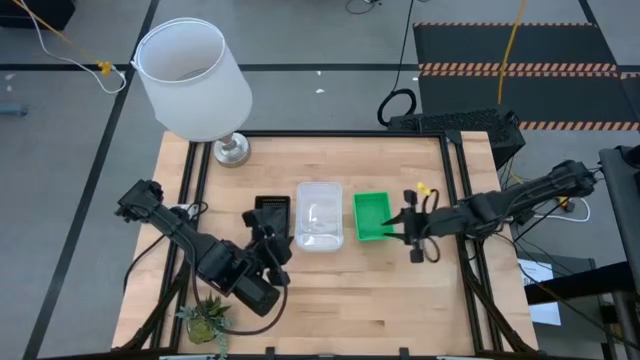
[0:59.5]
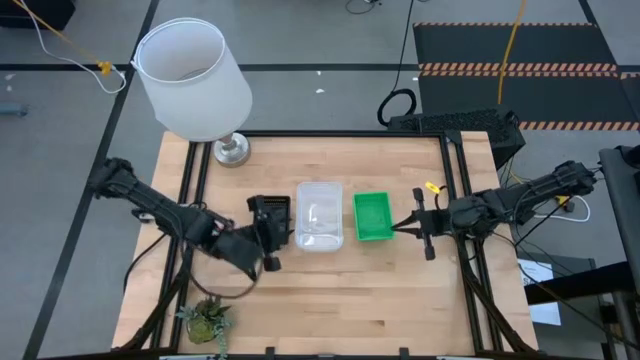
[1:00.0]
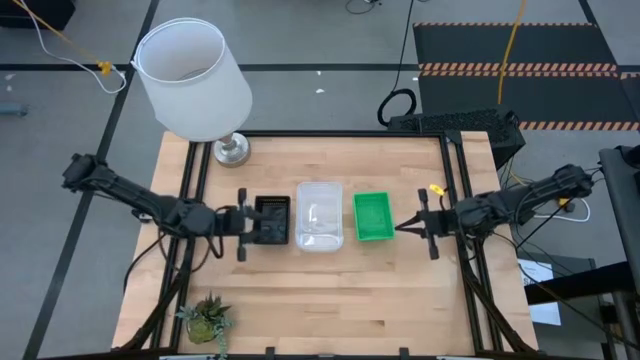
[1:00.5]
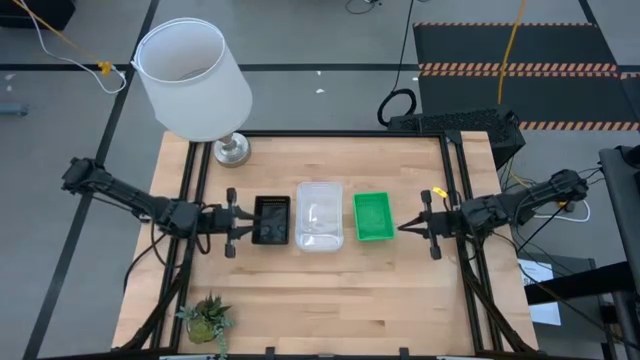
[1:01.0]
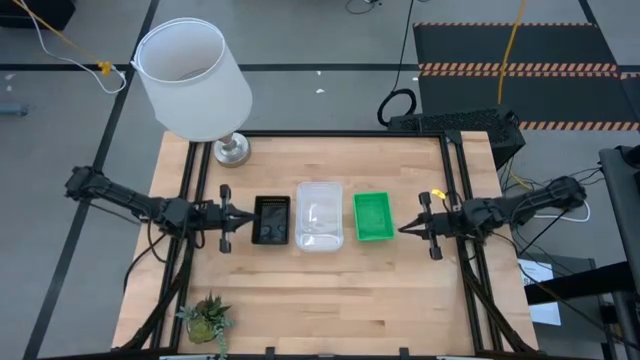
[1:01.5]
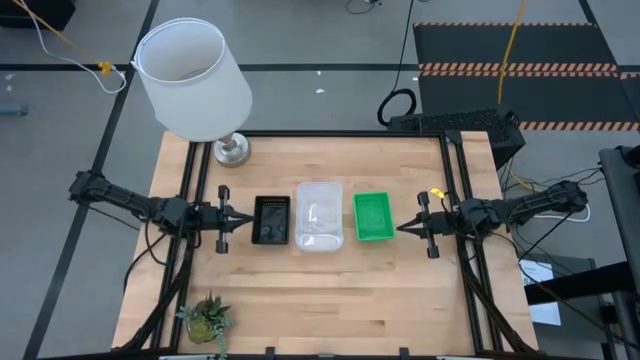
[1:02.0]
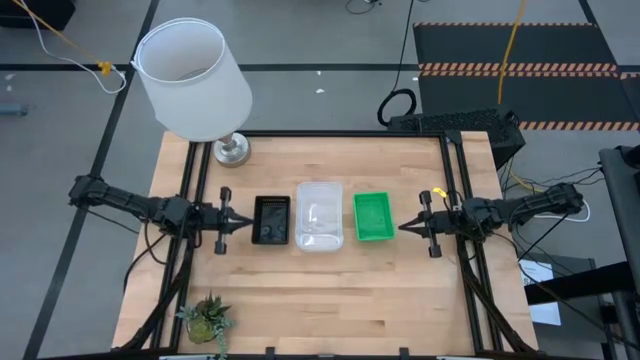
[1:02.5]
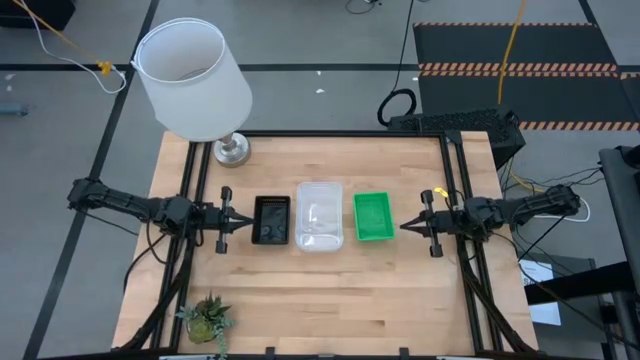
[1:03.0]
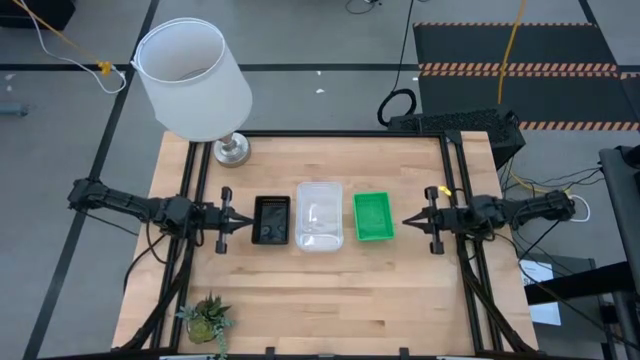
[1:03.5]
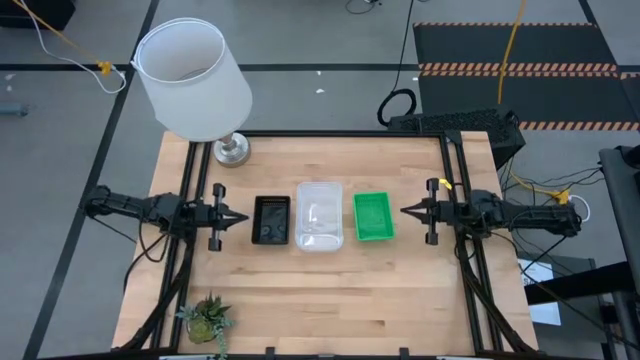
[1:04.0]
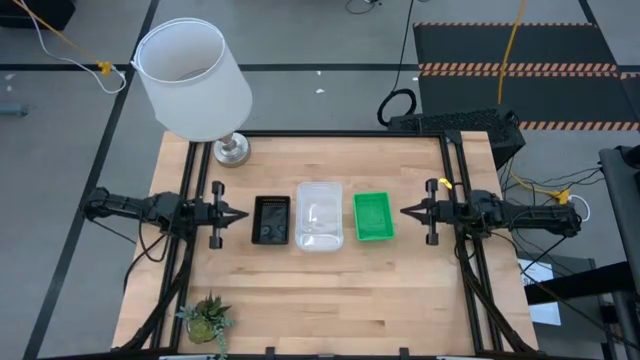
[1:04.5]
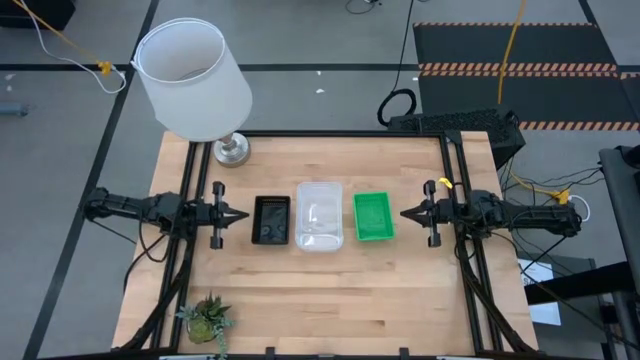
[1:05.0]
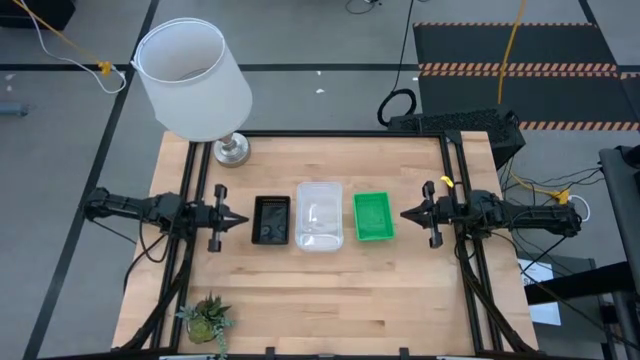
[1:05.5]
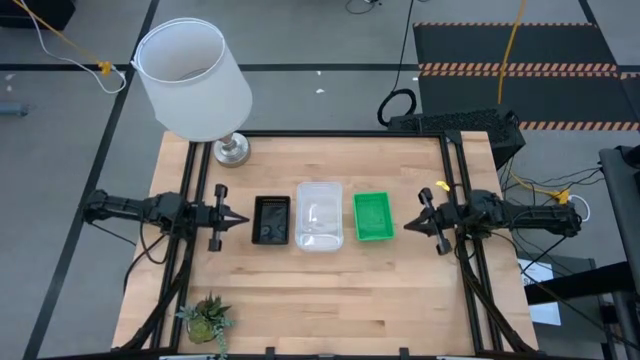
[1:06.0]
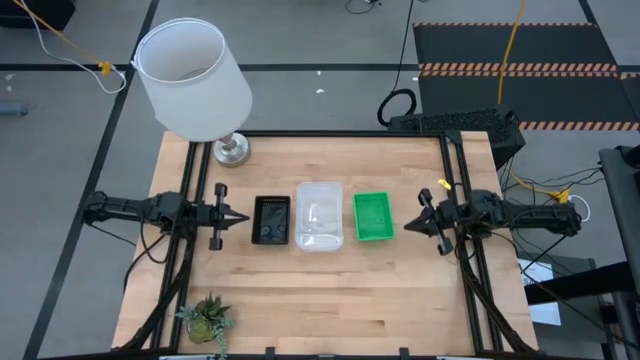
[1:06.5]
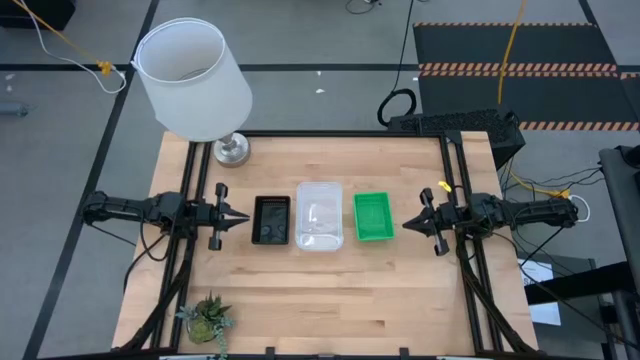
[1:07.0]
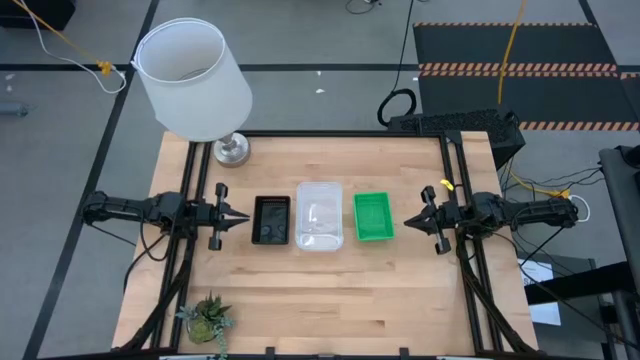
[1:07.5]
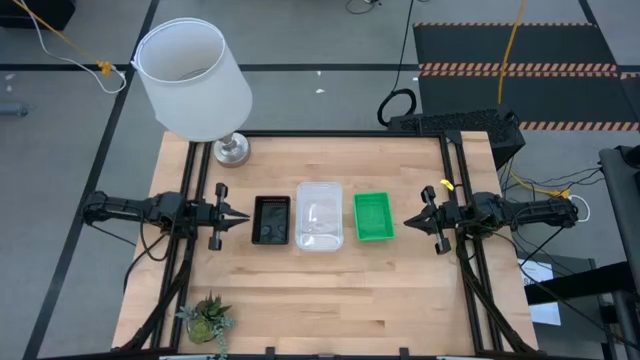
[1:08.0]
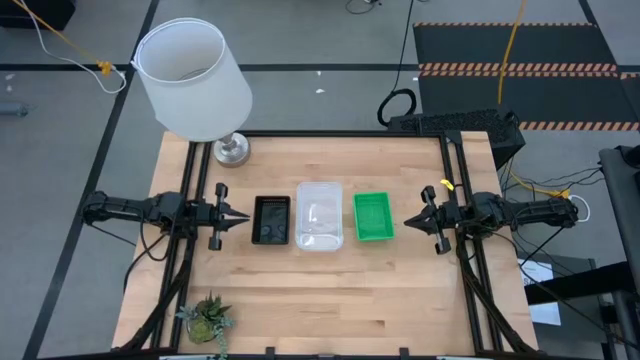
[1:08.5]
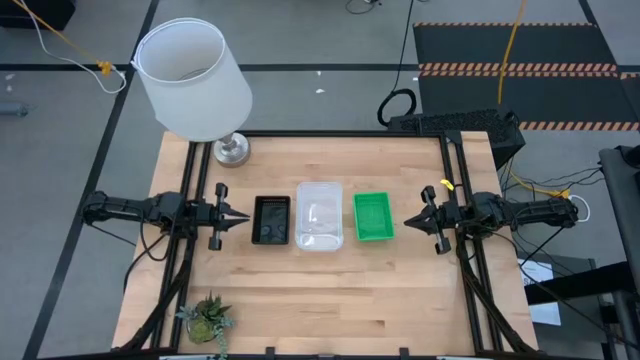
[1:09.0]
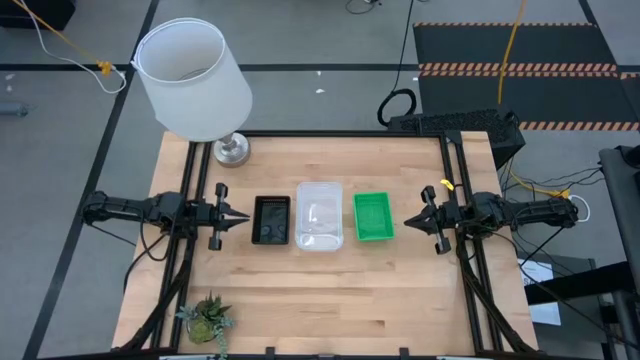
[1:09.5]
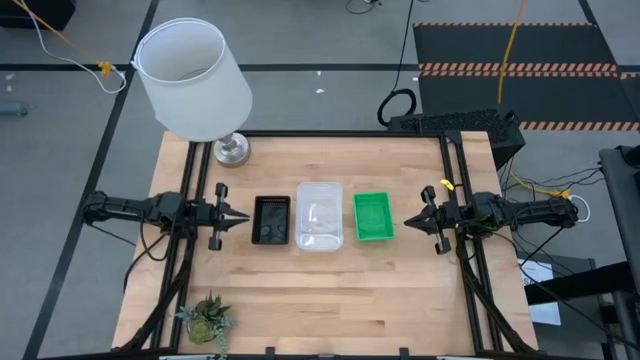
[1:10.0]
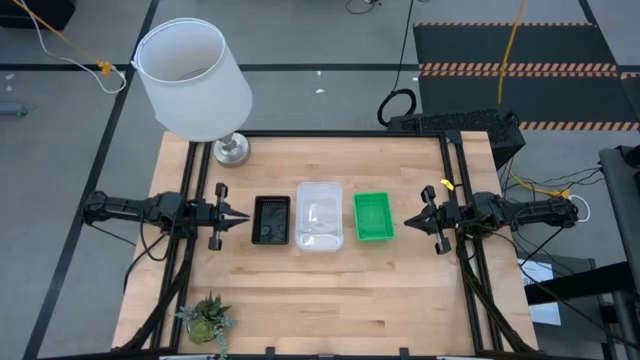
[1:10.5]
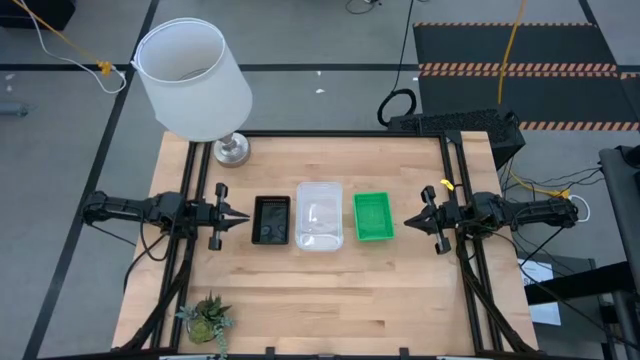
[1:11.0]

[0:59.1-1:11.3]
Return to Home Position
